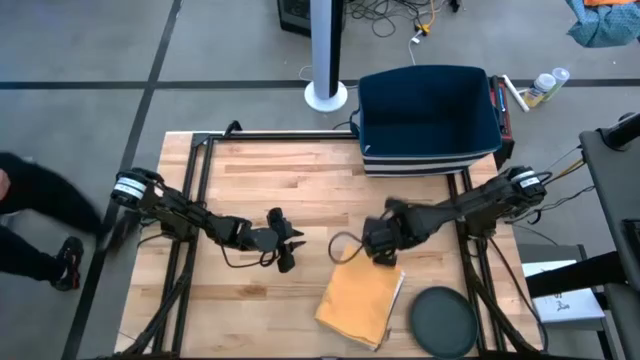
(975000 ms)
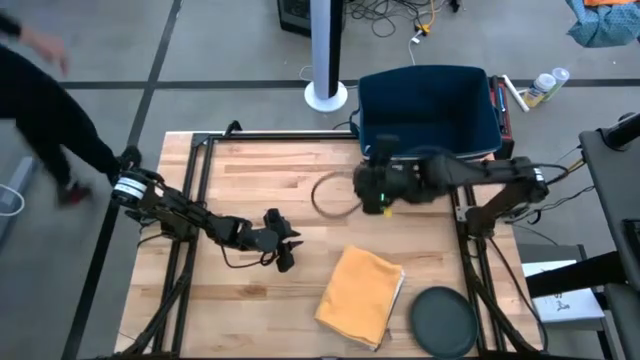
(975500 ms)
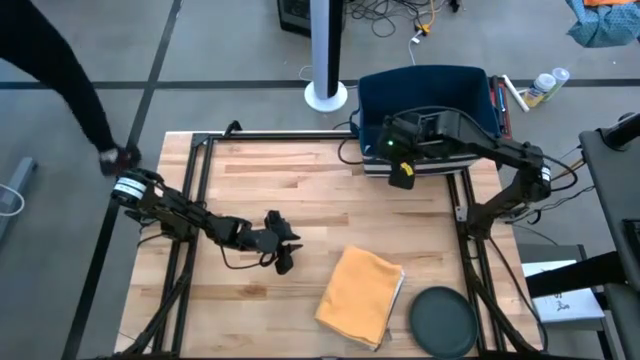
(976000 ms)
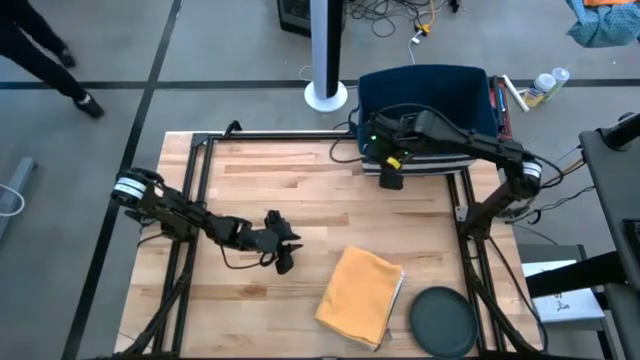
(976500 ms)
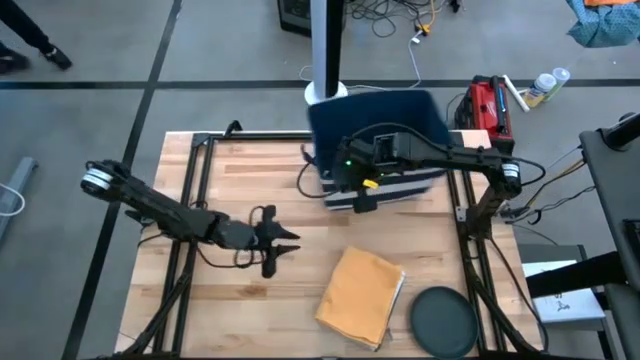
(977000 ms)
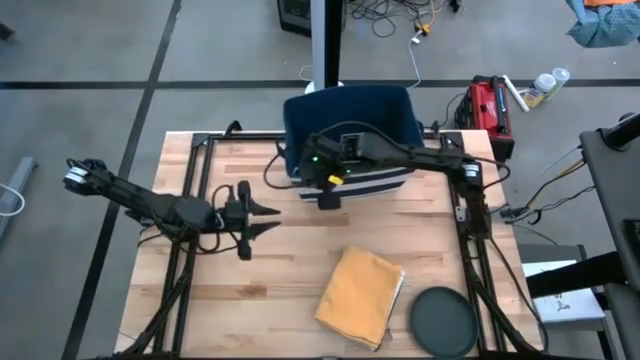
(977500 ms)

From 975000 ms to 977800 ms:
Task: Fold kitchen towel into neat rectangle
Move the blue laundry bin to top center

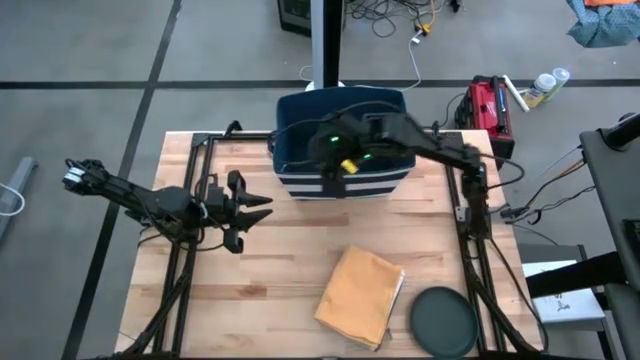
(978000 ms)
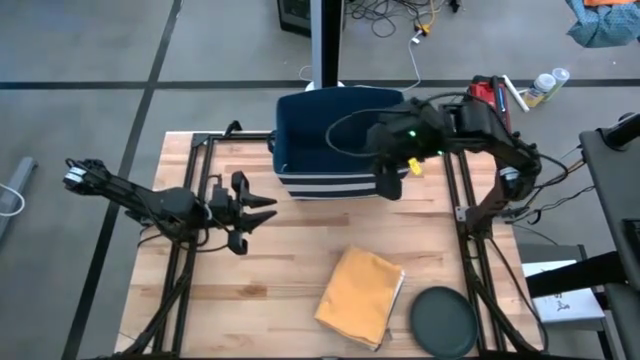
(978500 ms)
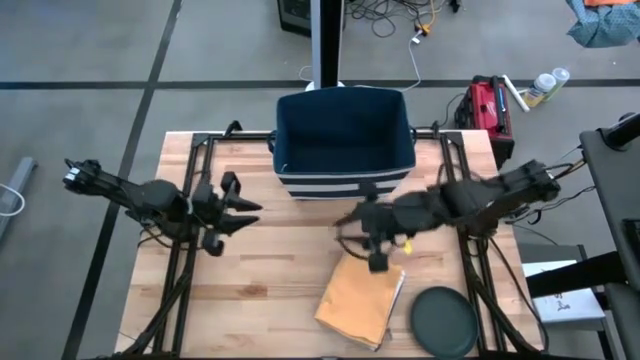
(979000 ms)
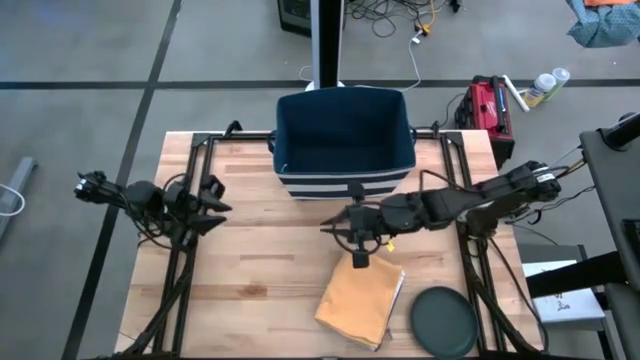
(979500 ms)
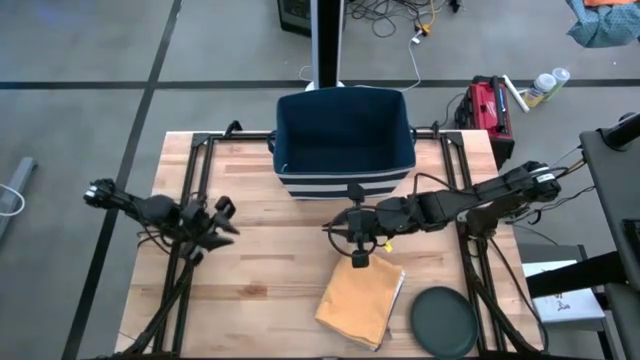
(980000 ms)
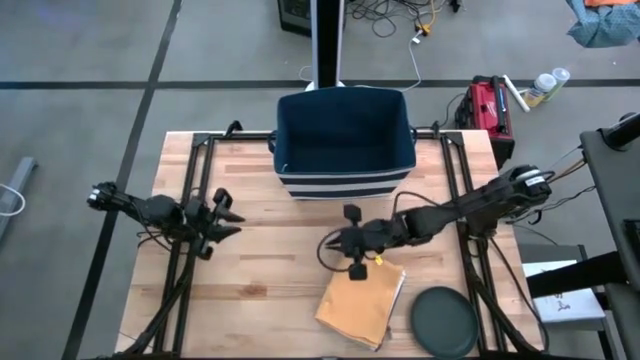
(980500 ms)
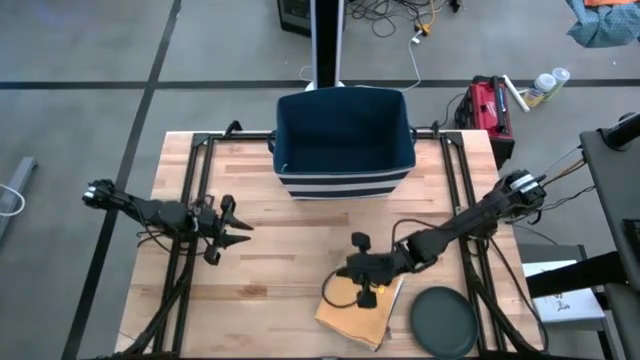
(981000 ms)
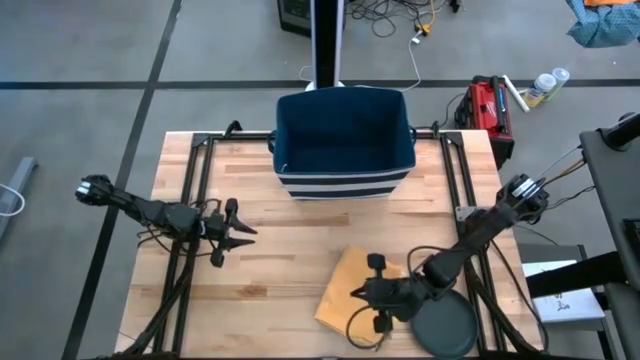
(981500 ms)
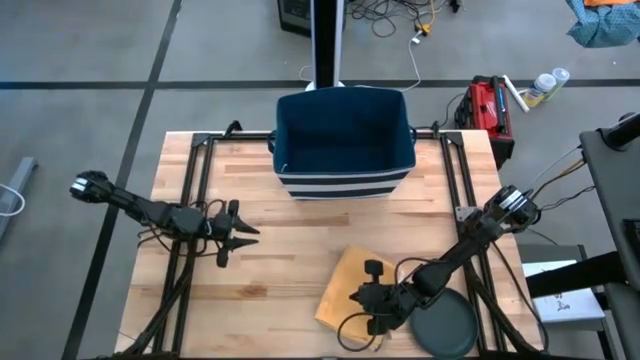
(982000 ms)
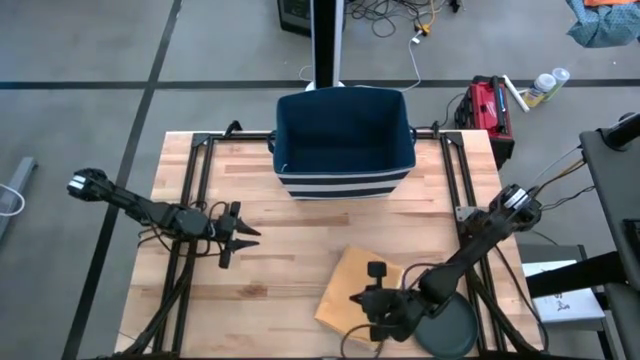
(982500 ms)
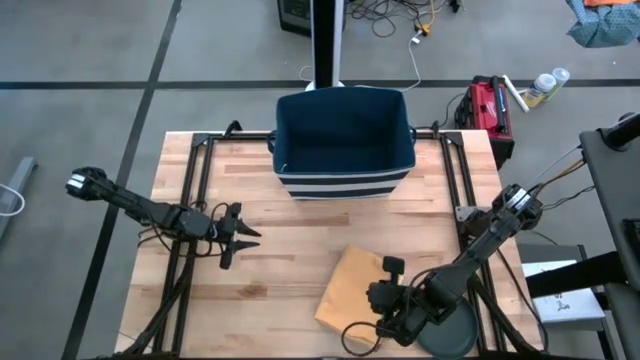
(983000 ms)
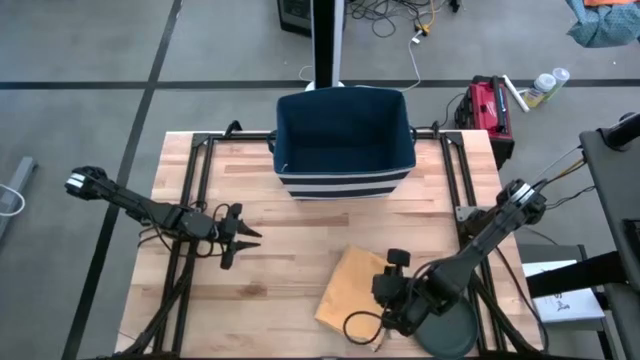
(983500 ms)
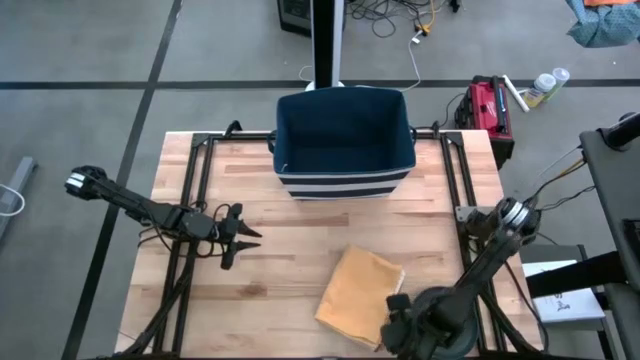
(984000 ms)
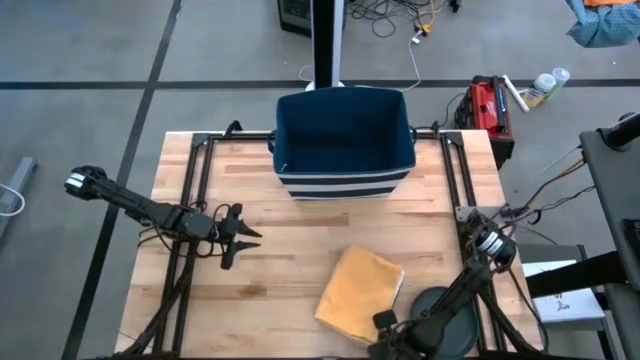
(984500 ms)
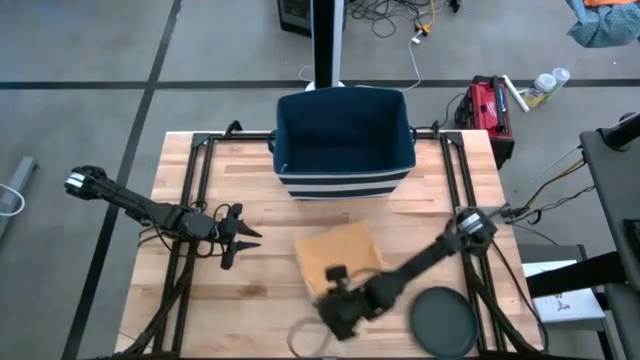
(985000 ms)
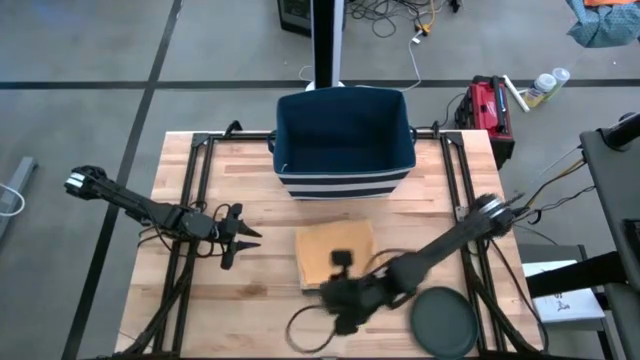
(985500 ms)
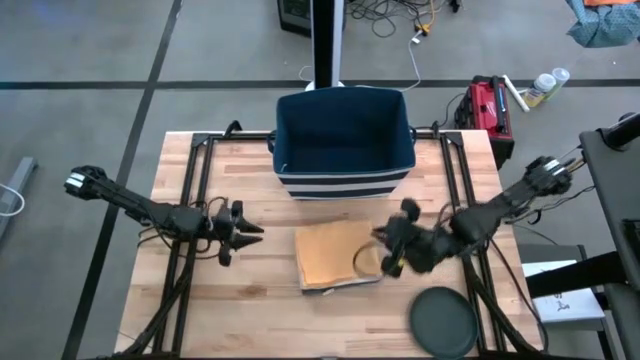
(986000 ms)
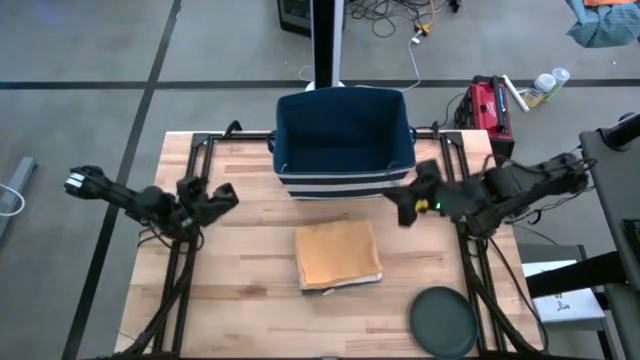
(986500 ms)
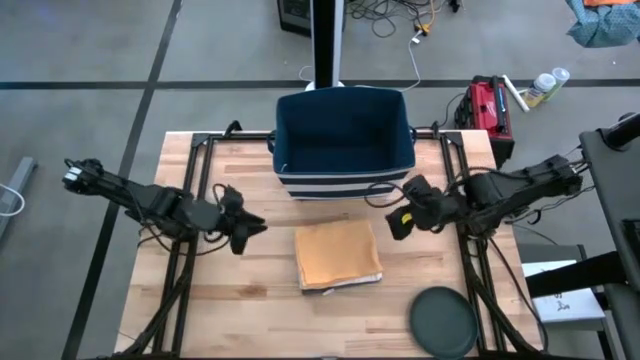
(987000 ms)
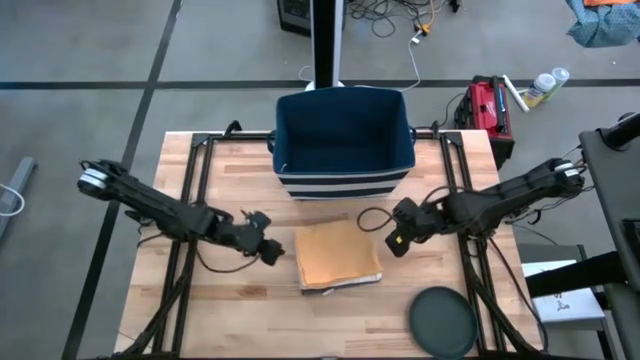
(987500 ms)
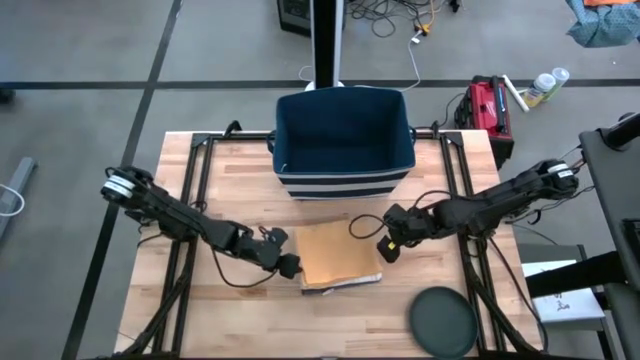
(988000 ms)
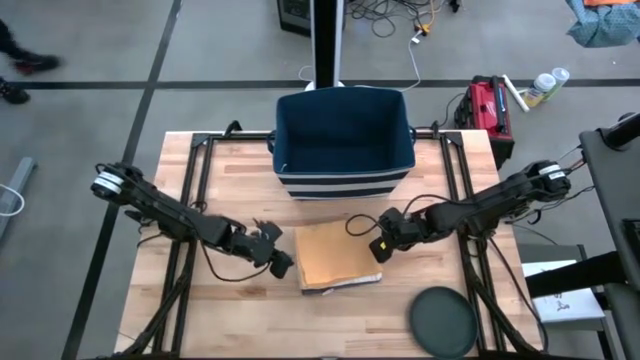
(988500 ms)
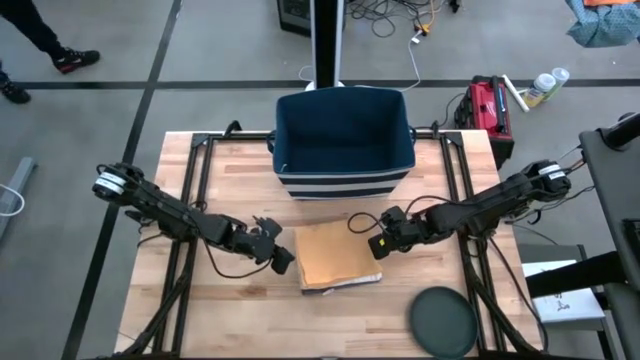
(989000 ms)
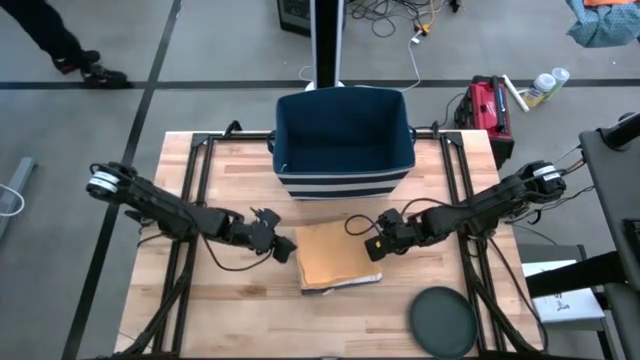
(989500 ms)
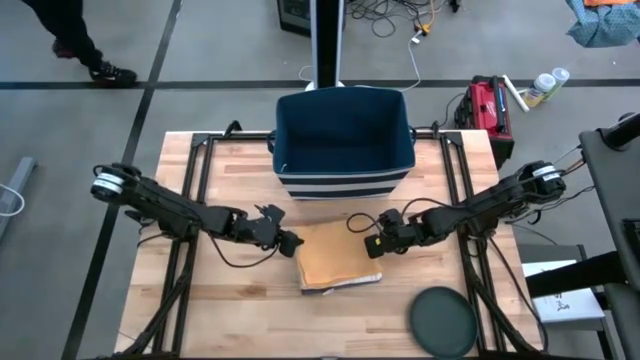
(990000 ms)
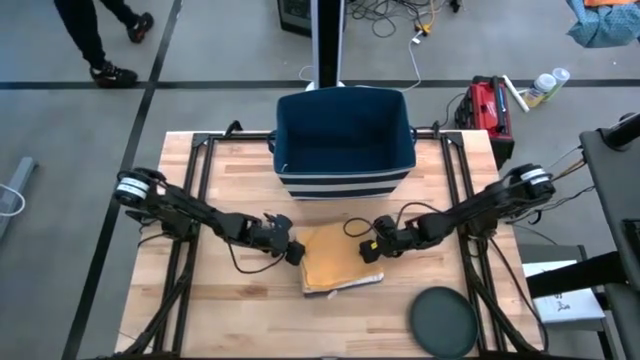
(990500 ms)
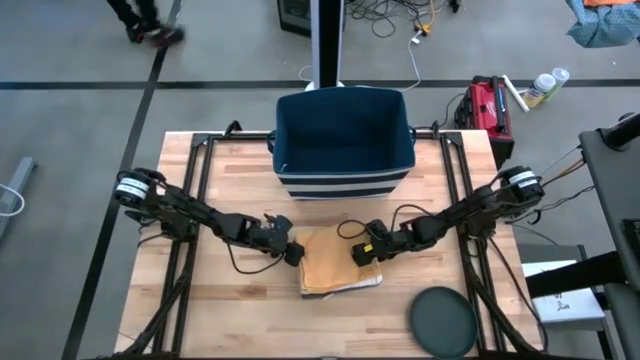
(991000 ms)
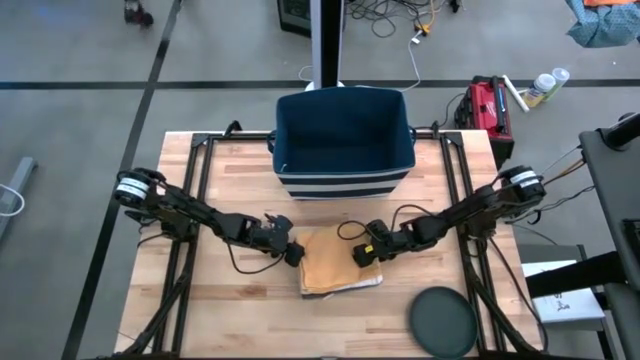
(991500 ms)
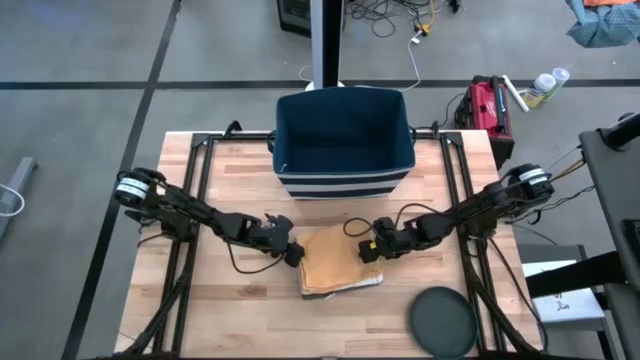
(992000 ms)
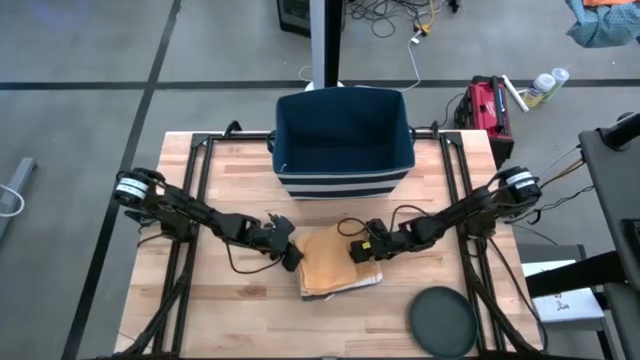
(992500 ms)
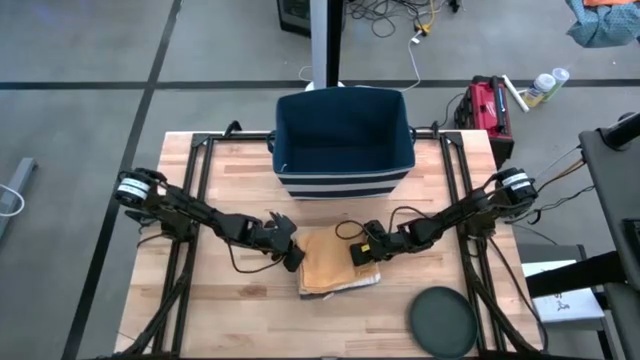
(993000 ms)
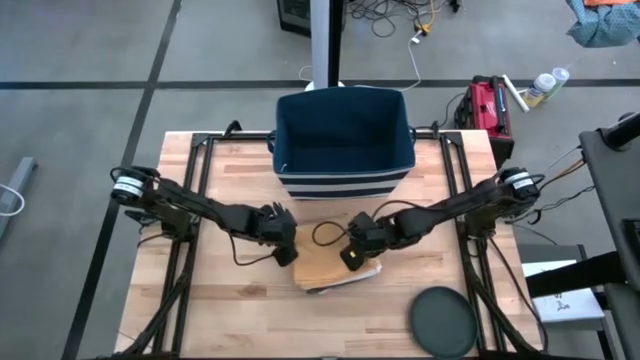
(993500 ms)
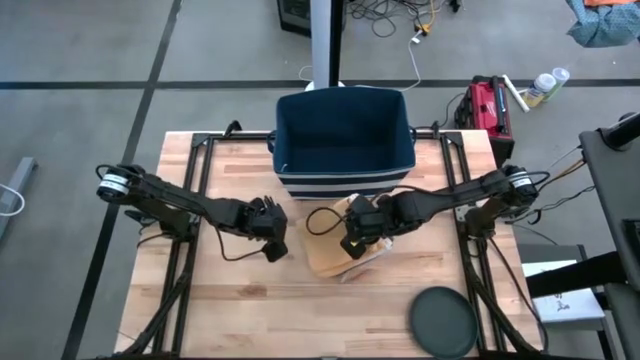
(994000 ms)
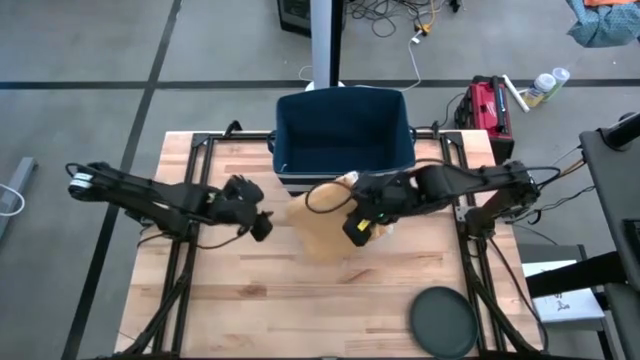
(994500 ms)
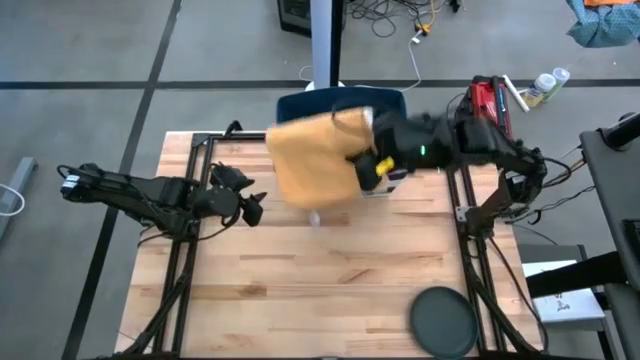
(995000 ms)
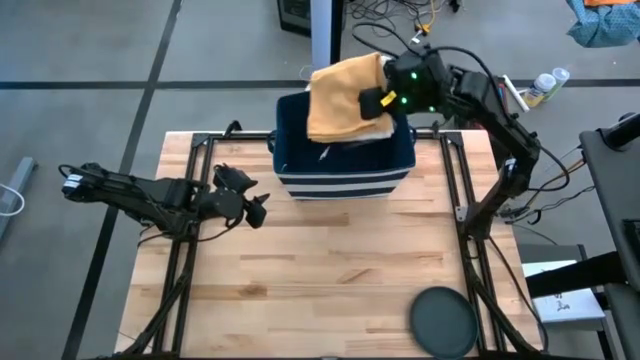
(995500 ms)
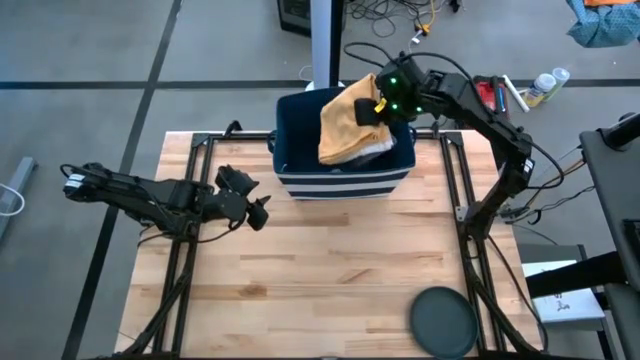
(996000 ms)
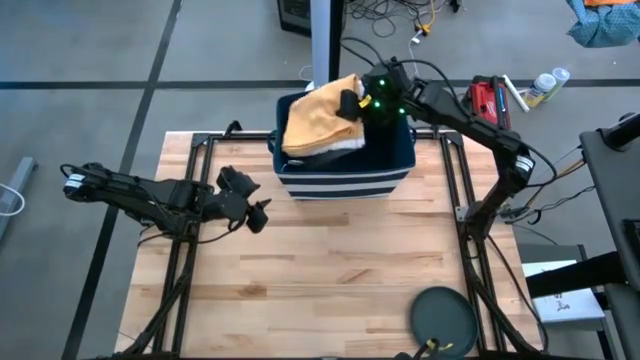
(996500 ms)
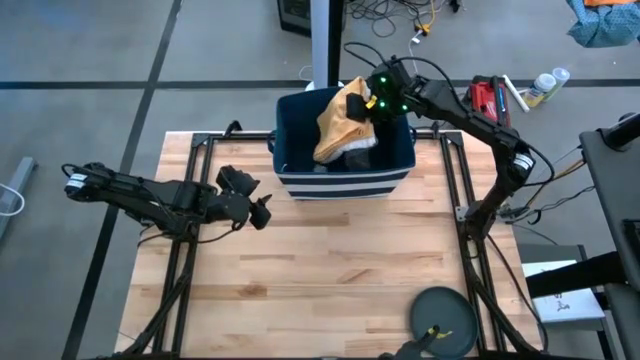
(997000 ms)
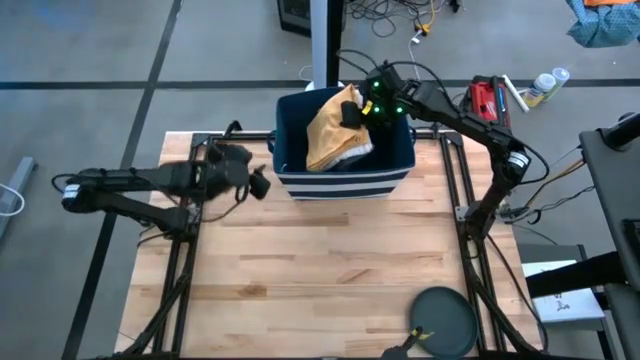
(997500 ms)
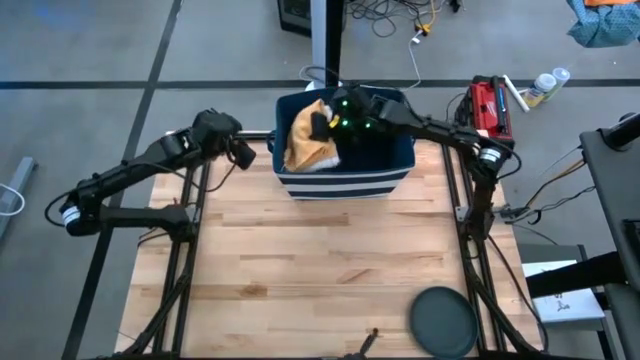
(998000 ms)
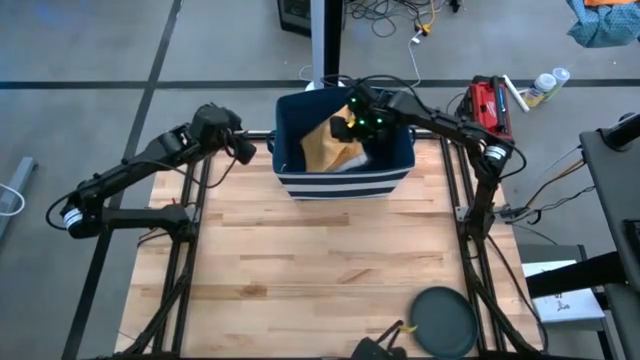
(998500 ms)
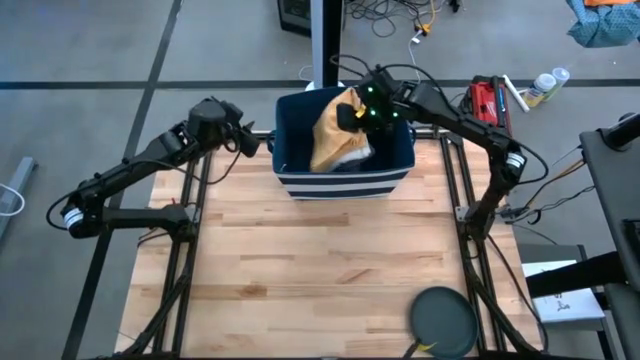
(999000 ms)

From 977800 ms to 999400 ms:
Put the stacked towels into the blue laundry bin
